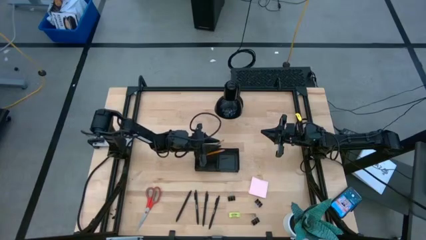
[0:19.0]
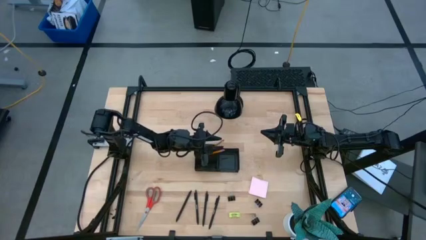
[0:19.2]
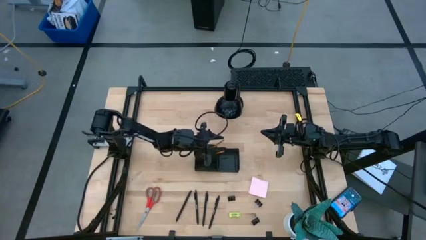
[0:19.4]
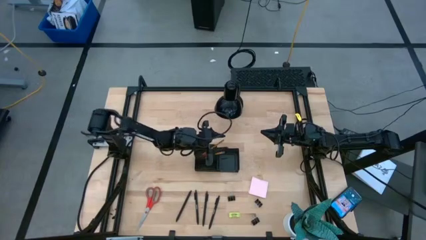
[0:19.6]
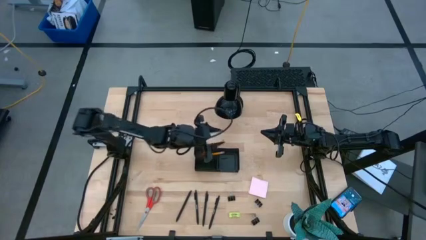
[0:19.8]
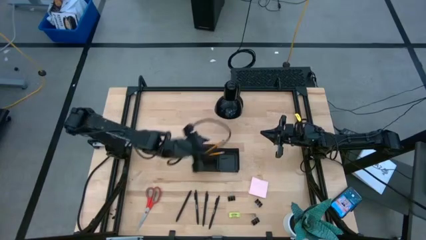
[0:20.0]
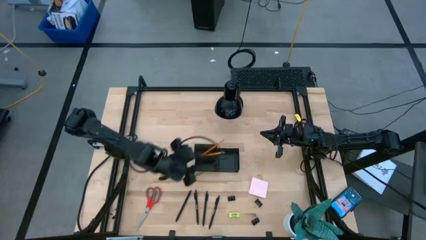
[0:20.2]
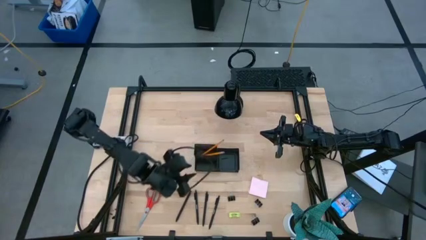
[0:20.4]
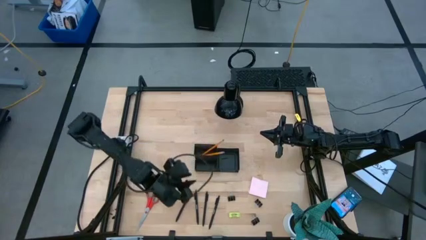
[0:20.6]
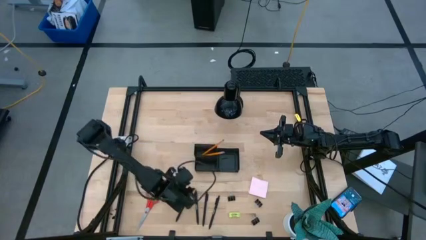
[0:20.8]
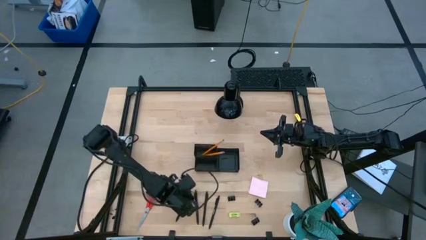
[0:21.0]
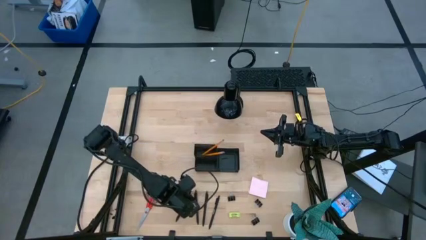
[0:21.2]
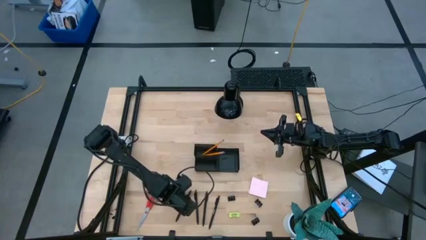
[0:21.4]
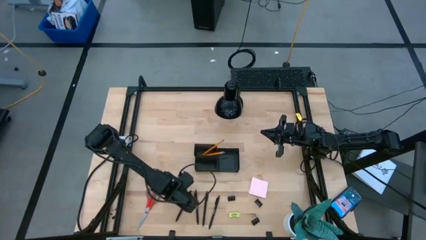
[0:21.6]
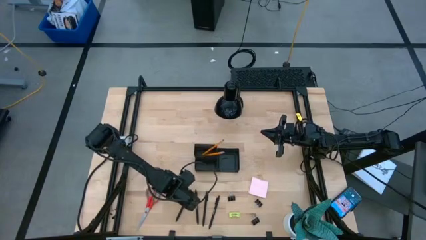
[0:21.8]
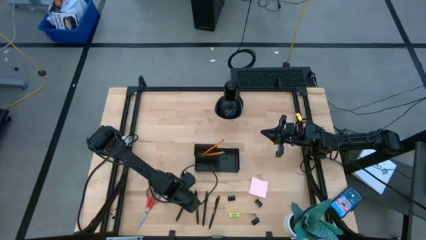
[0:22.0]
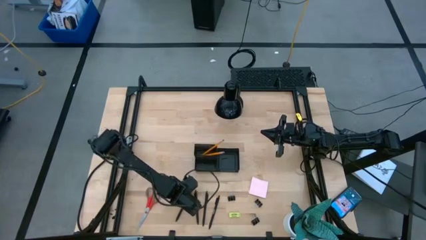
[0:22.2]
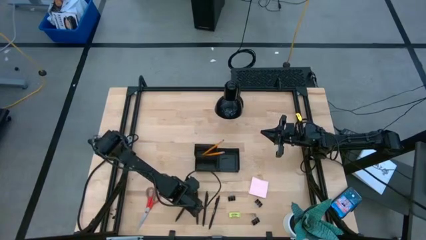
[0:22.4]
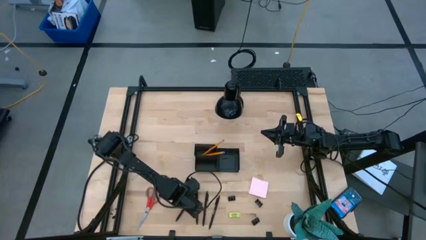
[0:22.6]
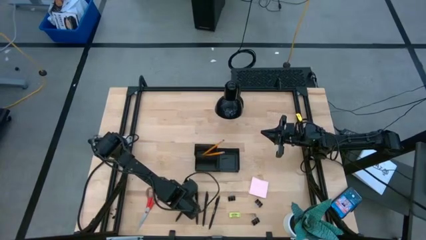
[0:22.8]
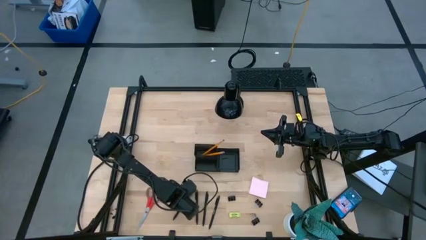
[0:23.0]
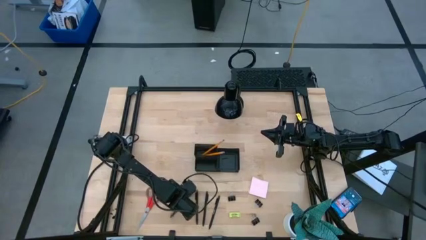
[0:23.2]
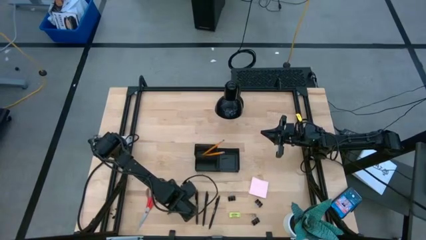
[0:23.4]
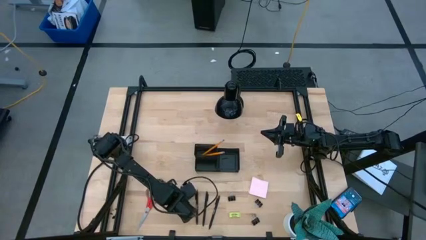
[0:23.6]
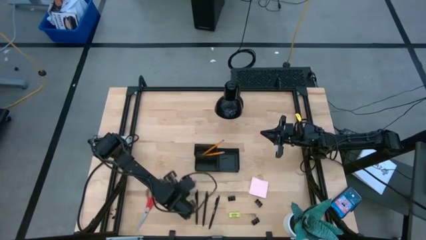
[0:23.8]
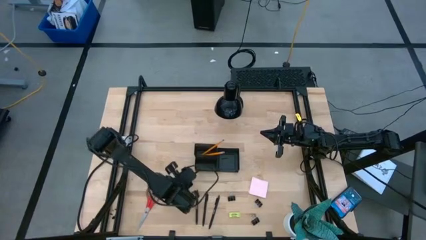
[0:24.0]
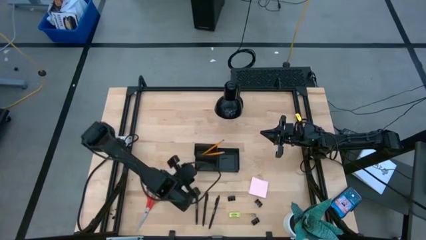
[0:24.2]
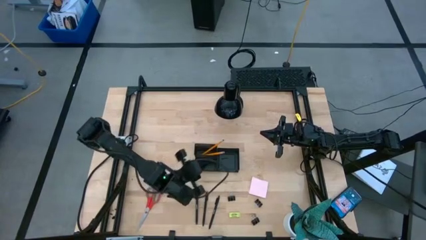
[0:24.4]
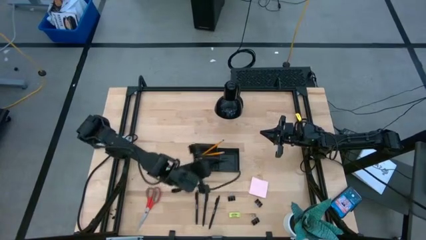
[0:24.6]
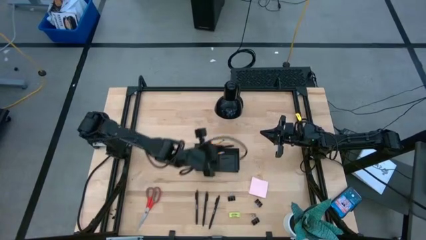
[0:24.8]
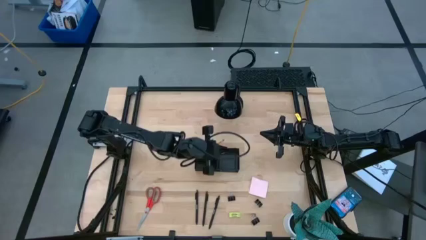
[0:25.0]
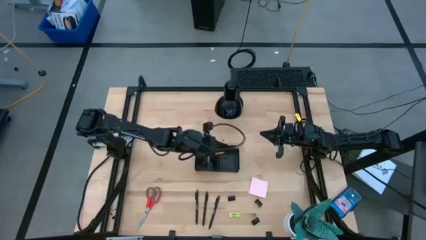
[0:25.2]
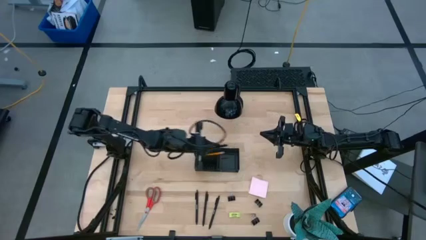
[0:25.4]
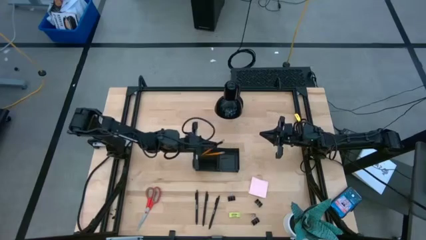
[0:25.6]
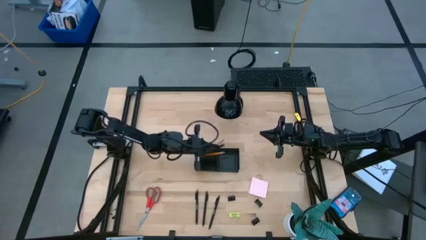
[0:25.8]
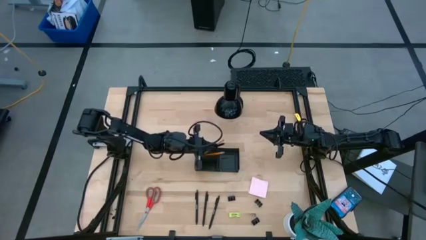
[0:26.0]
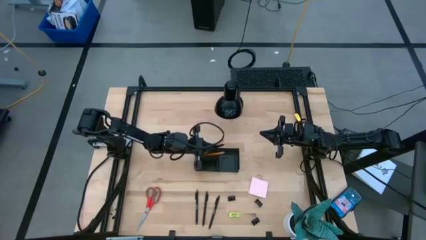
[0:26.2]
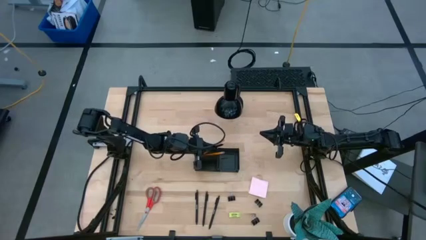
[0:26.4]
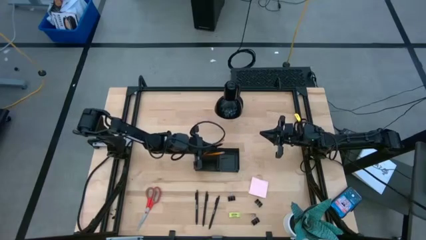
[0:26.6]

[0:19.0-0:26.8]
Task: Pick and place office supplies into organizer
Put the black pen into the black desk organizer

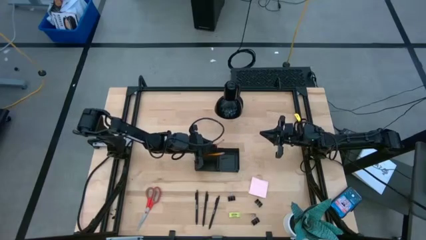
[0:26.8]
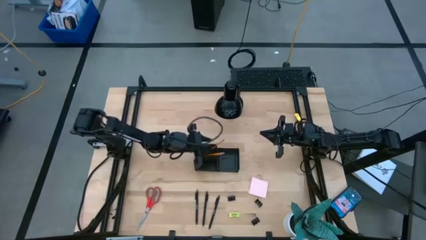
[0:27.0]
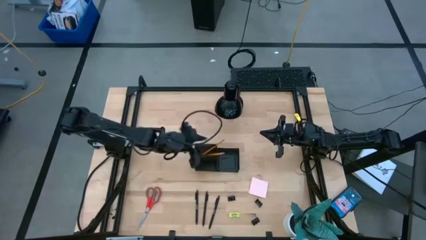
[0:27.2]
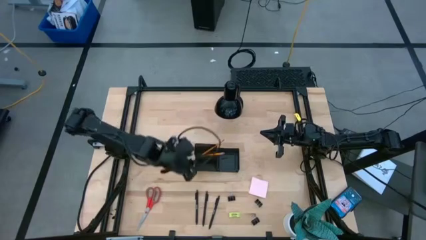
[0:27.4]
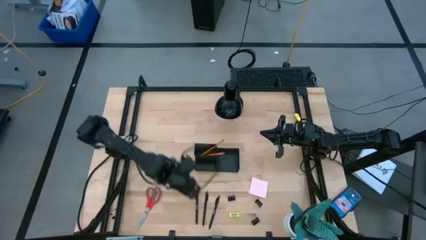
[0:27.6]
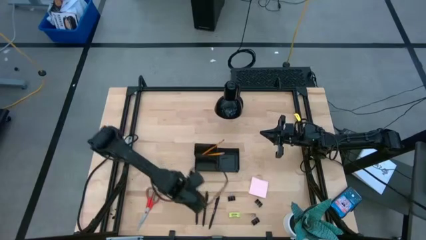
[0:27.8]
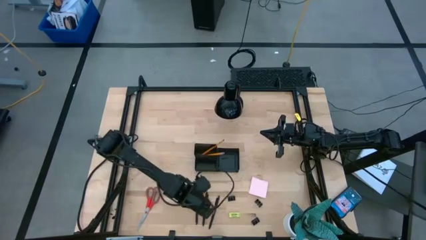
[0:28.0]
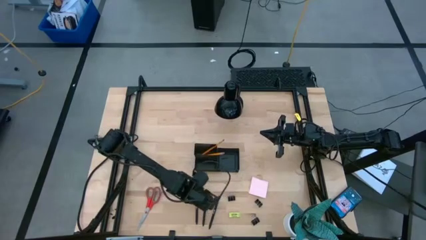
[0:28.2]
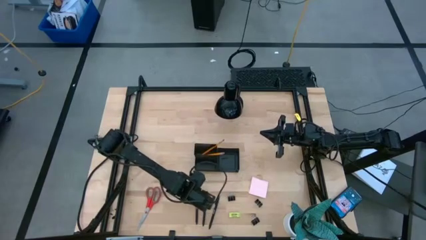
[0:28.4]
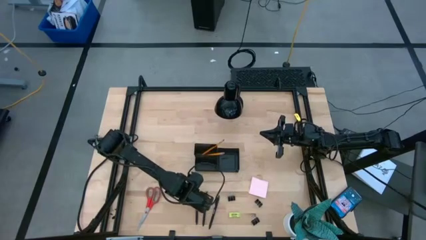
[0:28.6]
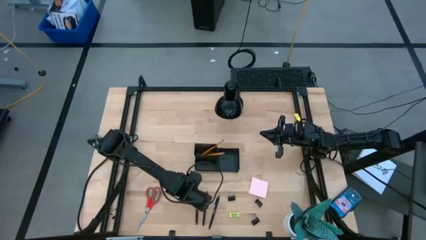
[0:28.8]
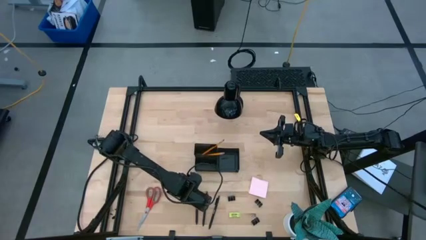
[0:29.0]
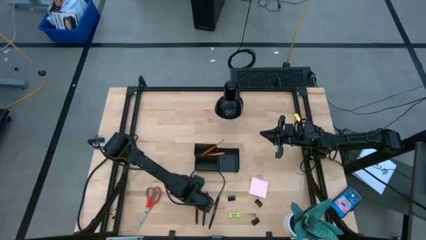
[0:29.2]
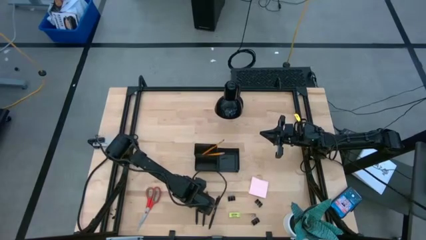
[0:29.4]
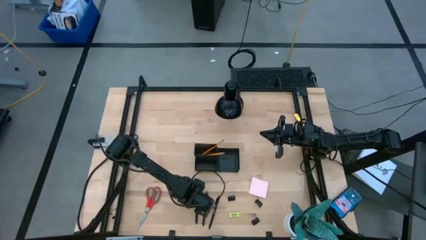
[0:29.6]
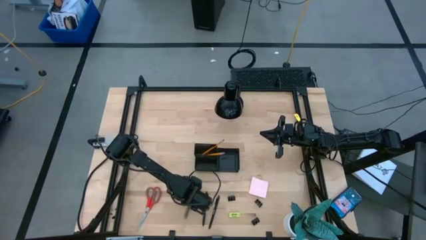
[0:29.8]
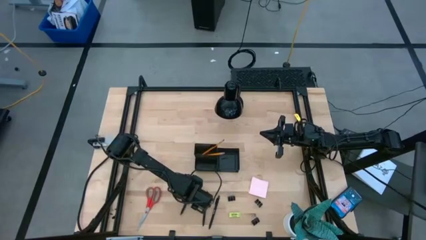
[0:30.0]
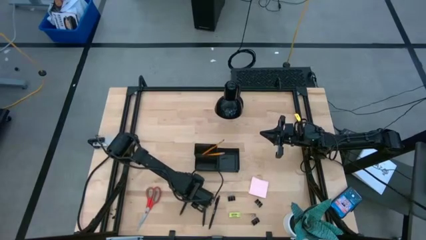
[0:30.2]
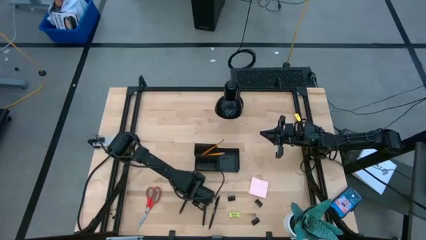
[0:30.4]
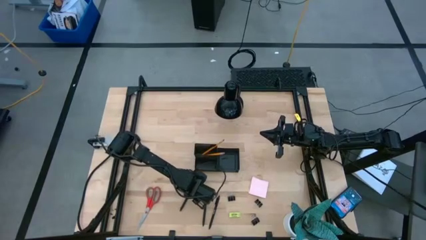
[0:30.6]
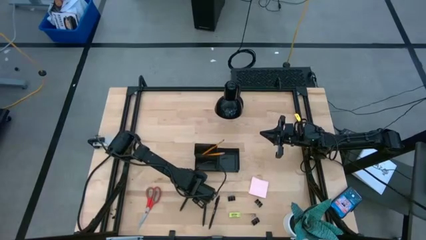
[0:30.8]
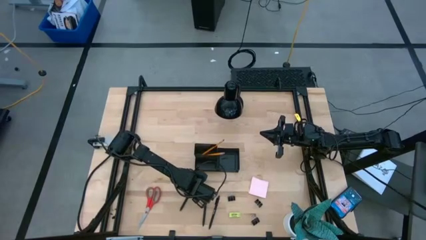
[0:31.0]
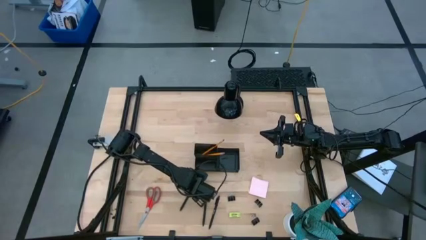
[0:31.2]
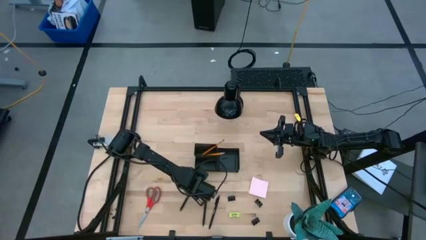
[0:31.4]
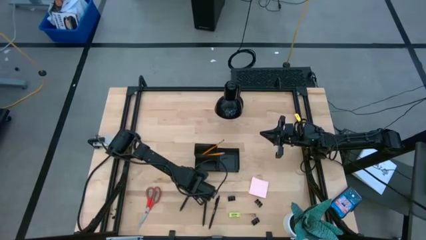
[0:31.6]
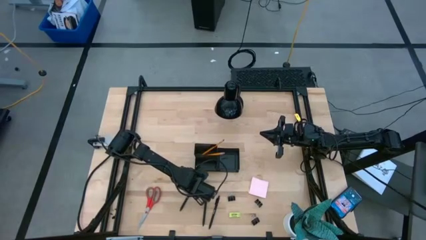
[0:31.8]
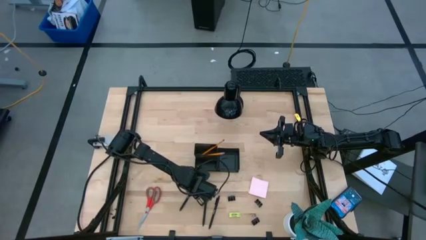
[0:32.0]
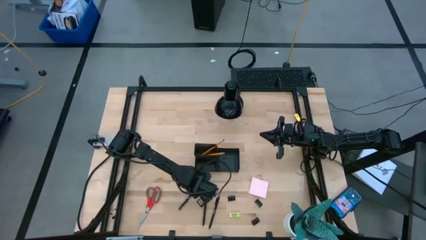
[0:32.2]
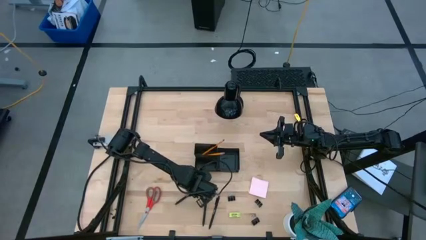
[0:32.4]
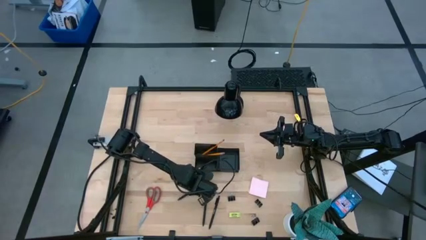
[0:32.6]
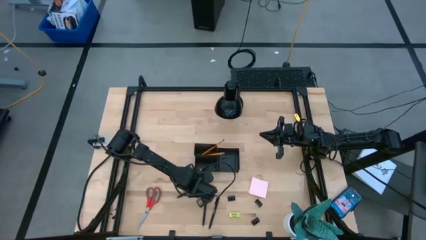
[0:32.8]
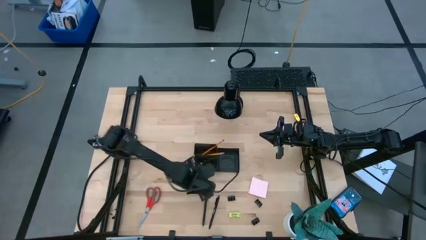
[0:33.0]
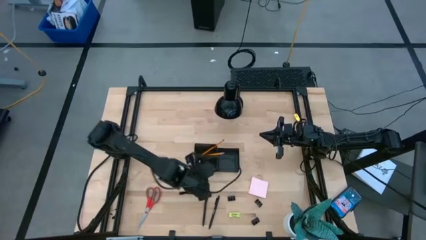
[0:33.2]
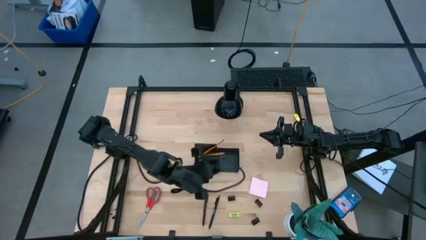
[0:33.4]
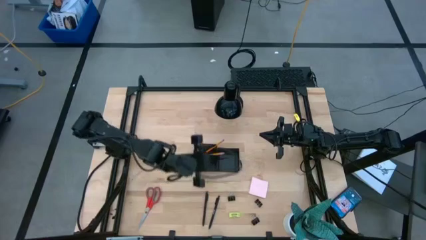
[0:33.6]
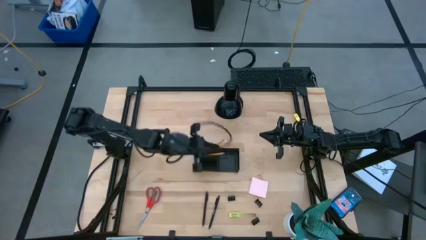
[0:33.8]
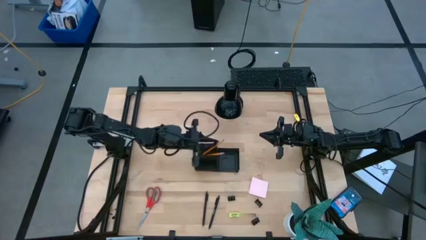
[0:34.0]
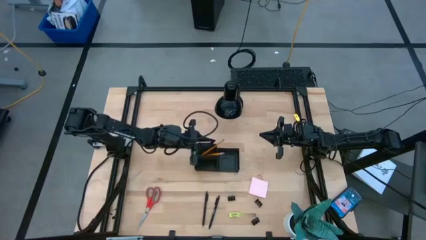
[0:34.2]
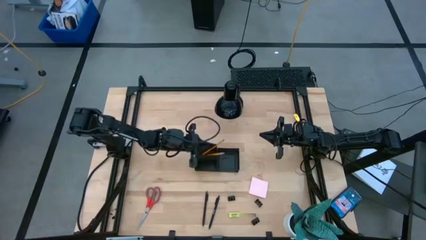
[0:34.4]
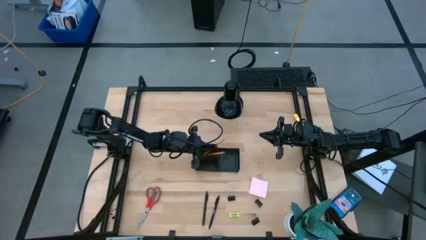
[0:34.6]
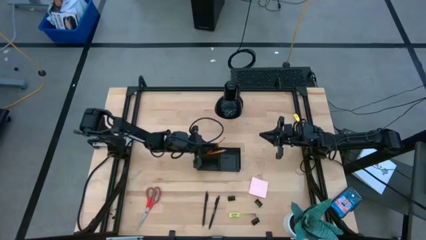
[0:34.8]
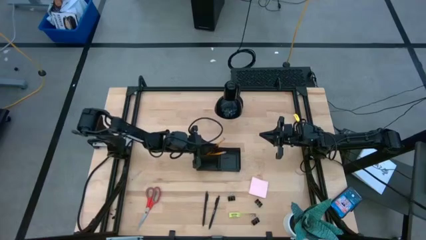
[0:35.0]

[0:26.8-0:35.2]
Put the black pen into the black desk organizer
